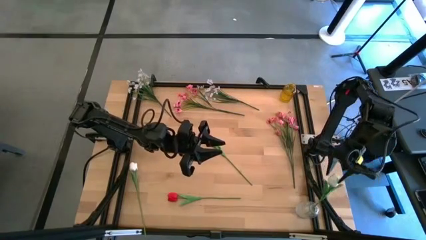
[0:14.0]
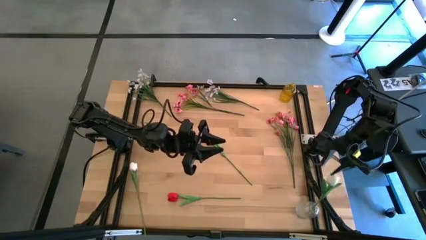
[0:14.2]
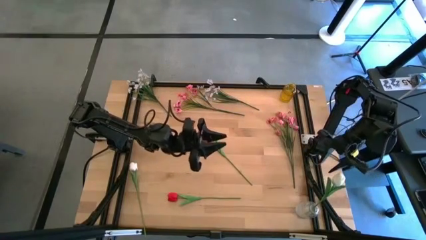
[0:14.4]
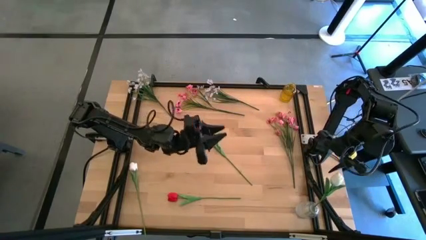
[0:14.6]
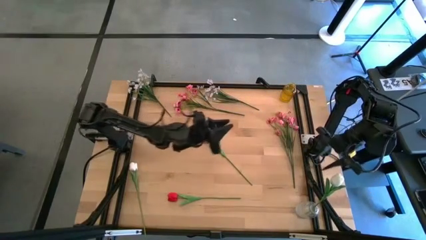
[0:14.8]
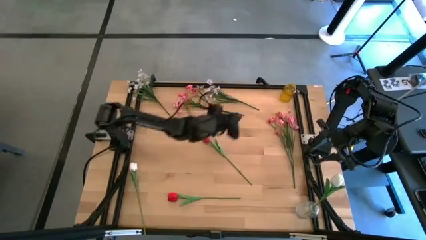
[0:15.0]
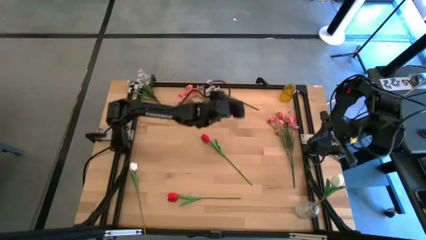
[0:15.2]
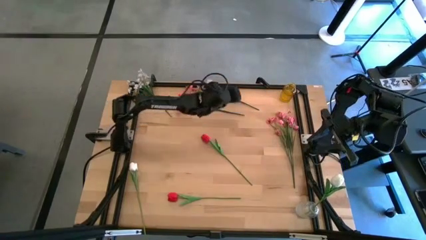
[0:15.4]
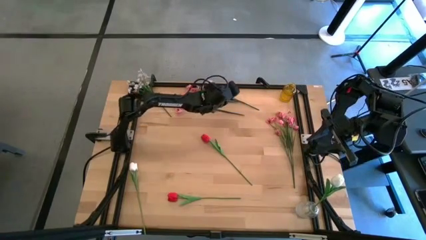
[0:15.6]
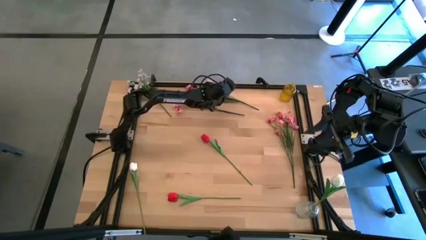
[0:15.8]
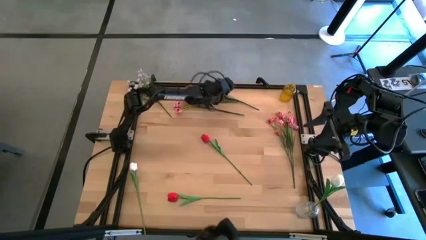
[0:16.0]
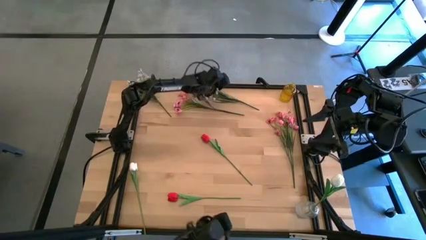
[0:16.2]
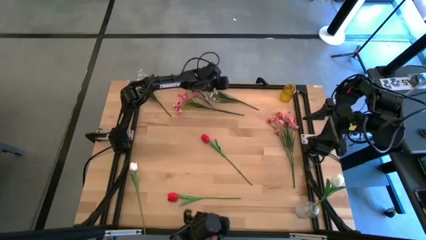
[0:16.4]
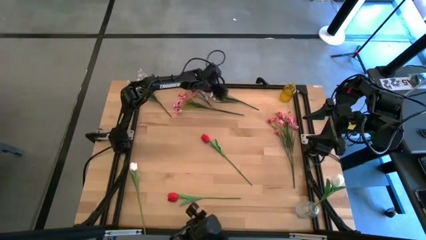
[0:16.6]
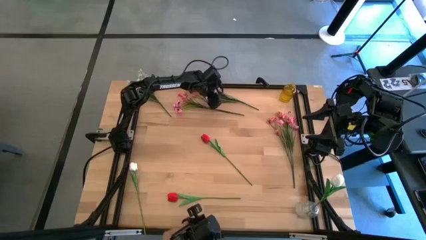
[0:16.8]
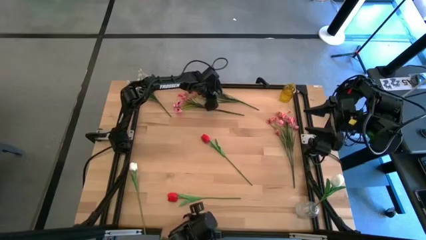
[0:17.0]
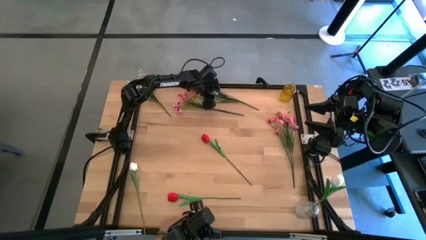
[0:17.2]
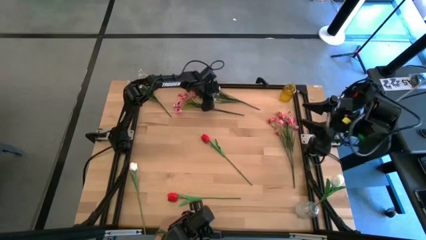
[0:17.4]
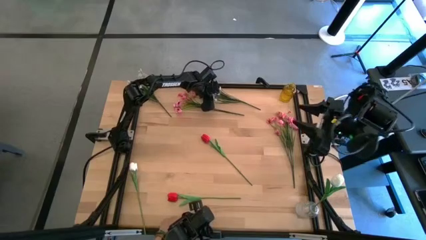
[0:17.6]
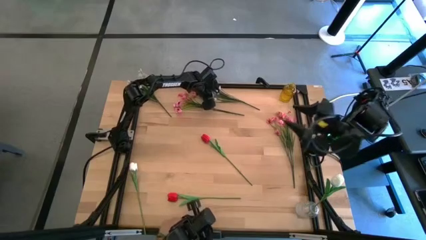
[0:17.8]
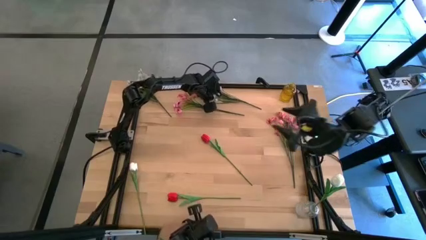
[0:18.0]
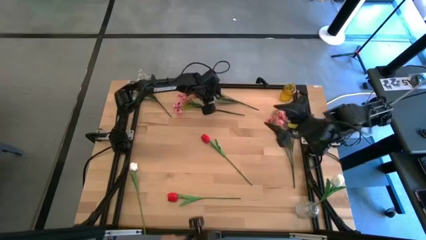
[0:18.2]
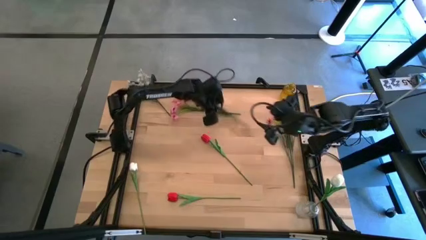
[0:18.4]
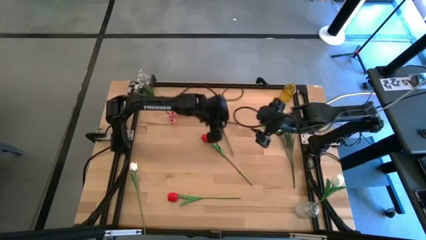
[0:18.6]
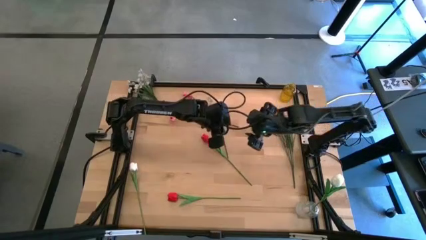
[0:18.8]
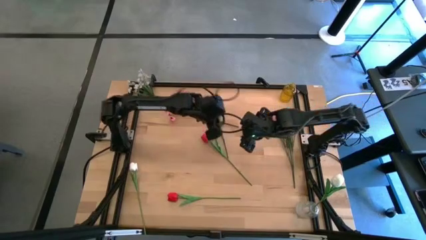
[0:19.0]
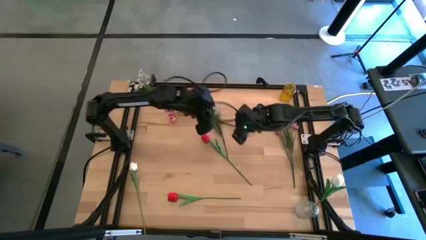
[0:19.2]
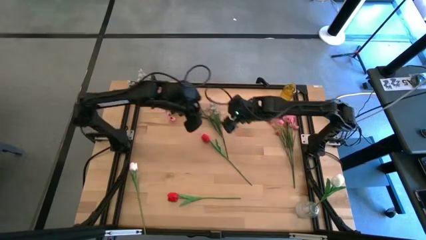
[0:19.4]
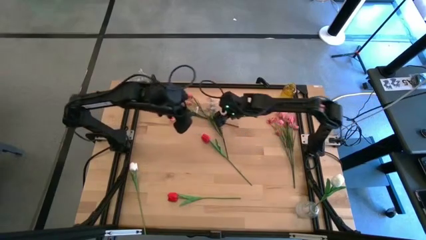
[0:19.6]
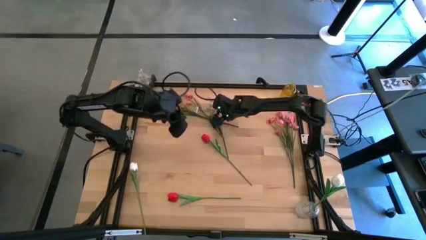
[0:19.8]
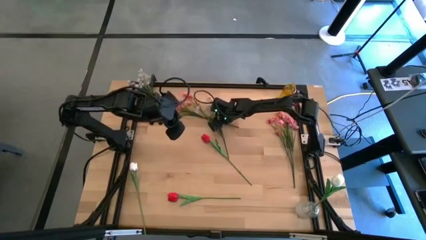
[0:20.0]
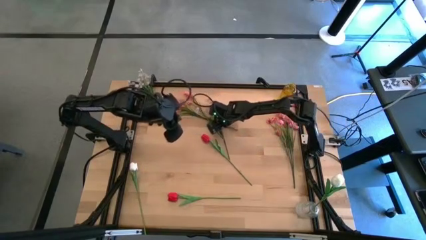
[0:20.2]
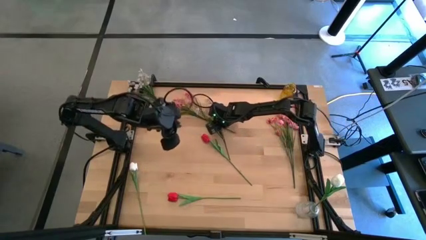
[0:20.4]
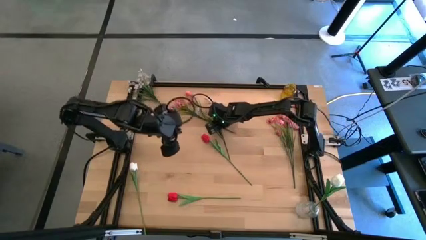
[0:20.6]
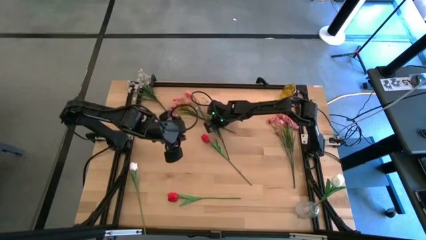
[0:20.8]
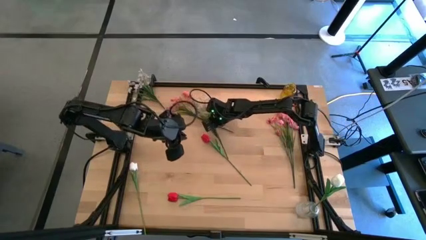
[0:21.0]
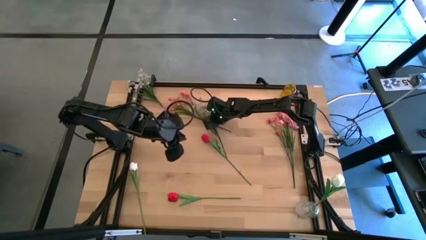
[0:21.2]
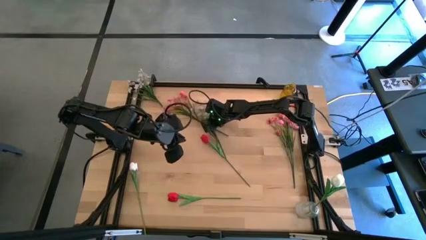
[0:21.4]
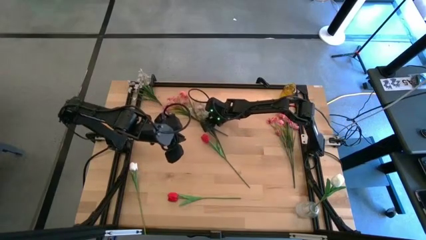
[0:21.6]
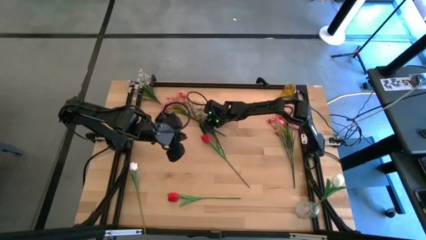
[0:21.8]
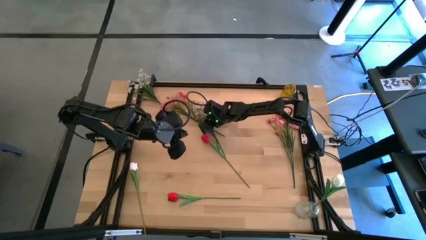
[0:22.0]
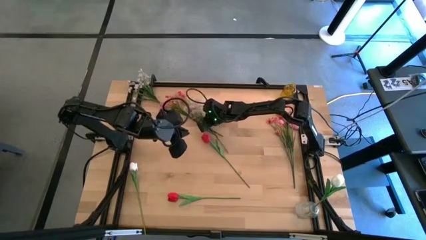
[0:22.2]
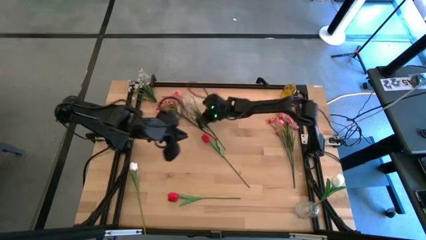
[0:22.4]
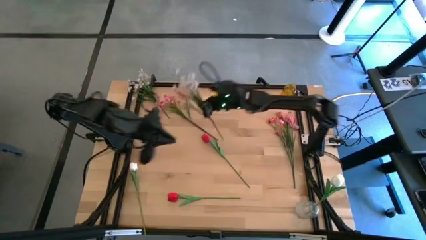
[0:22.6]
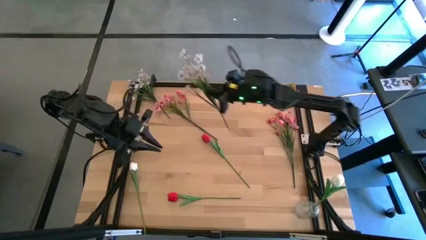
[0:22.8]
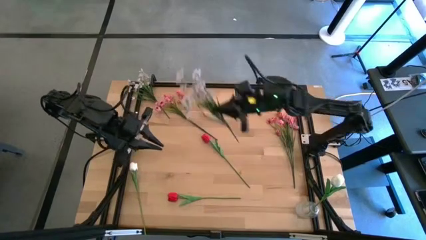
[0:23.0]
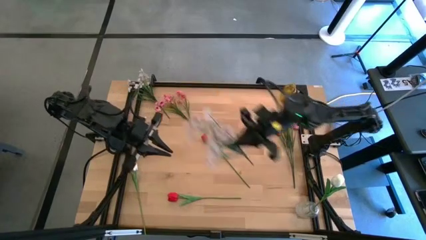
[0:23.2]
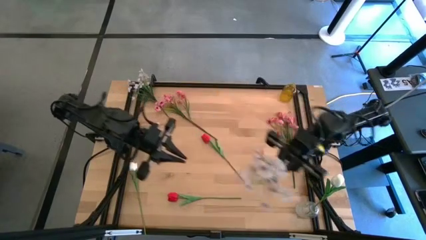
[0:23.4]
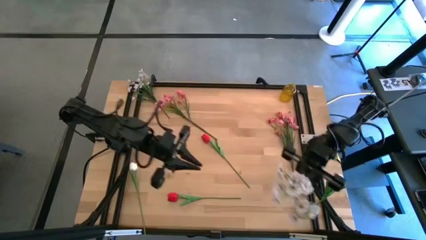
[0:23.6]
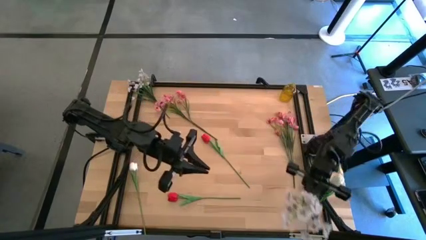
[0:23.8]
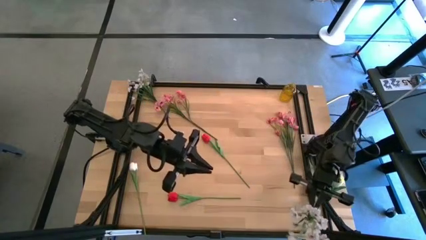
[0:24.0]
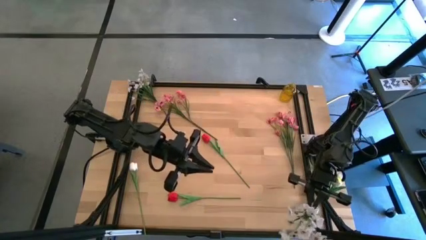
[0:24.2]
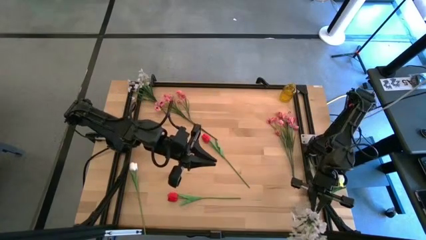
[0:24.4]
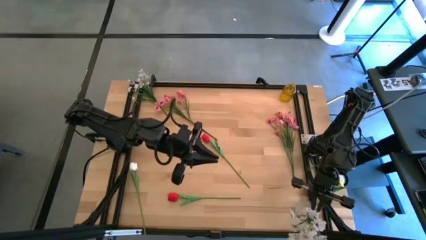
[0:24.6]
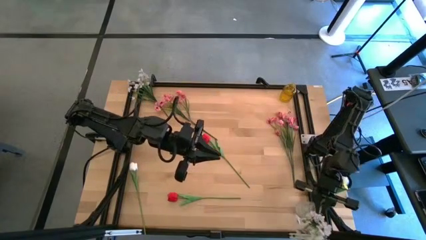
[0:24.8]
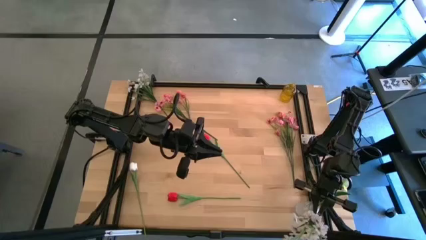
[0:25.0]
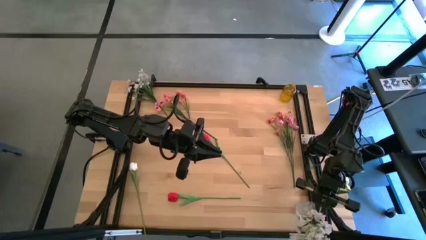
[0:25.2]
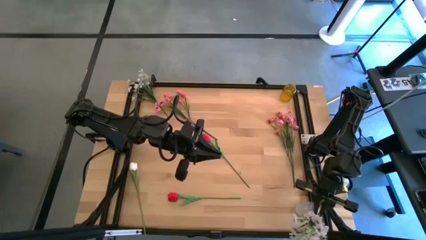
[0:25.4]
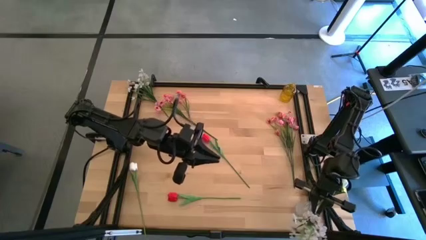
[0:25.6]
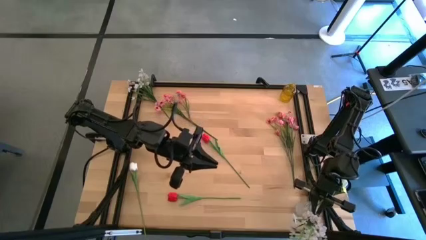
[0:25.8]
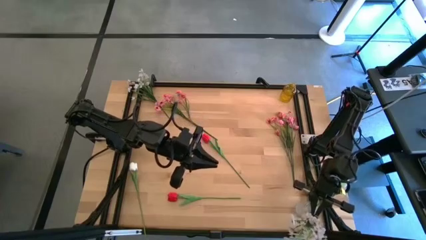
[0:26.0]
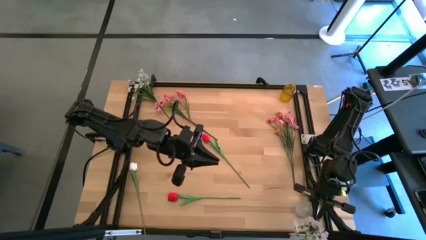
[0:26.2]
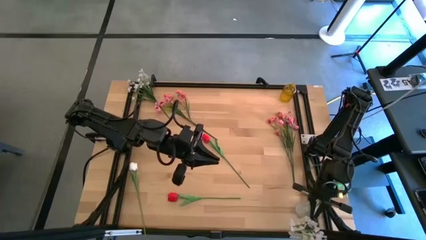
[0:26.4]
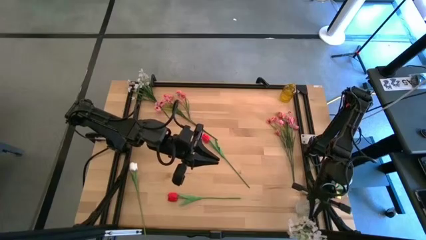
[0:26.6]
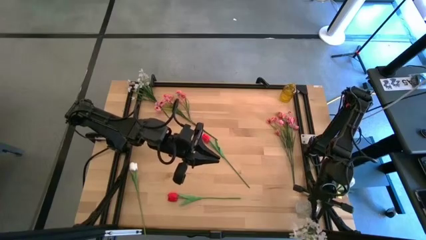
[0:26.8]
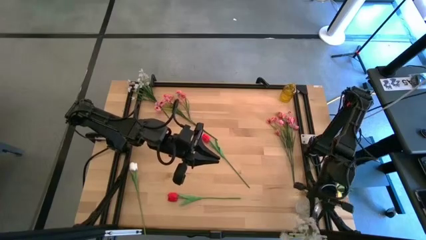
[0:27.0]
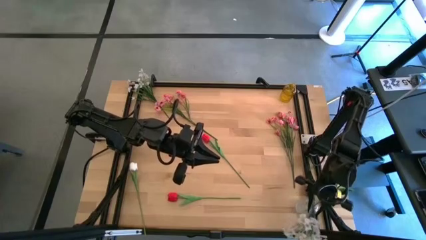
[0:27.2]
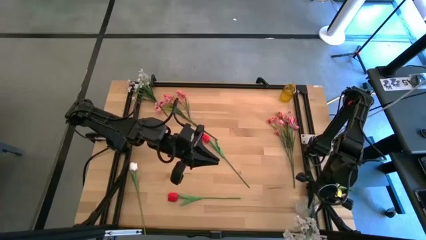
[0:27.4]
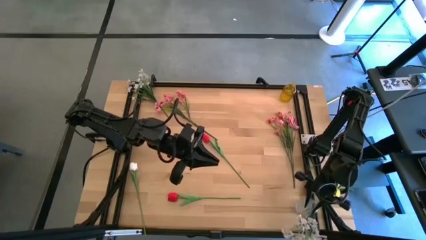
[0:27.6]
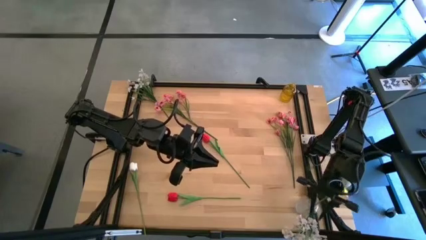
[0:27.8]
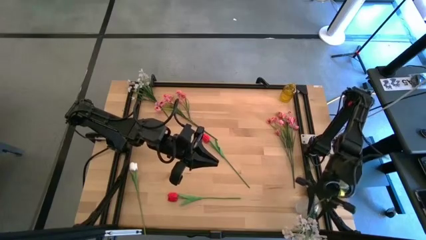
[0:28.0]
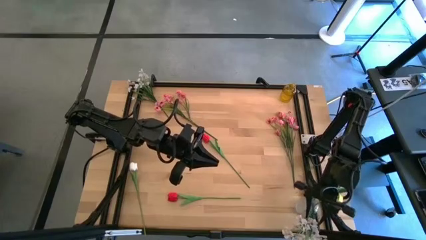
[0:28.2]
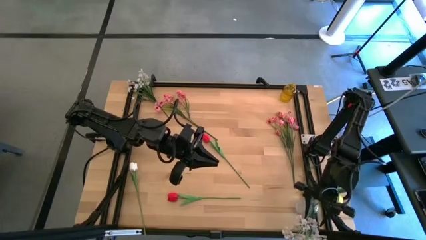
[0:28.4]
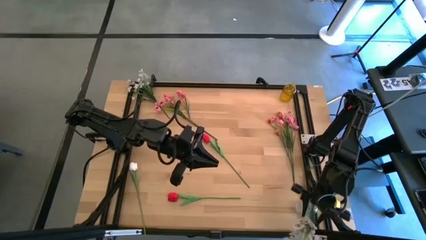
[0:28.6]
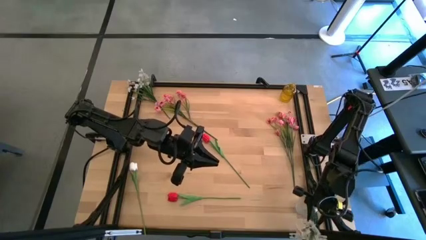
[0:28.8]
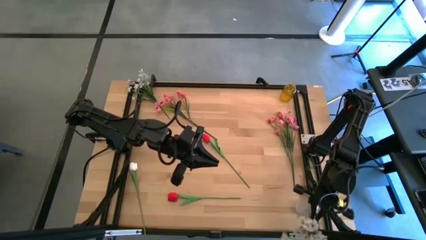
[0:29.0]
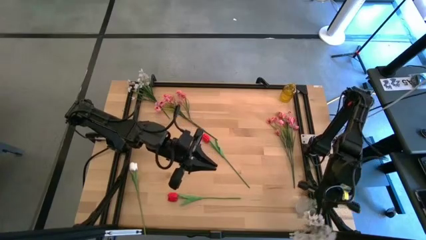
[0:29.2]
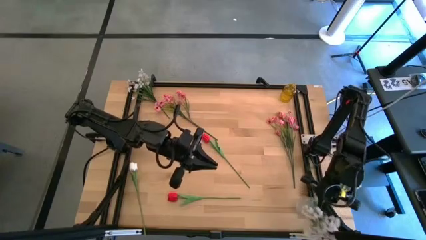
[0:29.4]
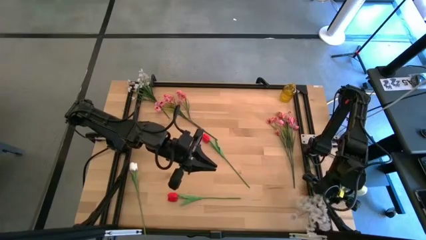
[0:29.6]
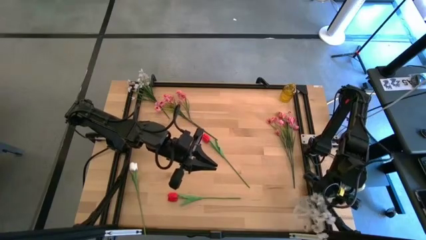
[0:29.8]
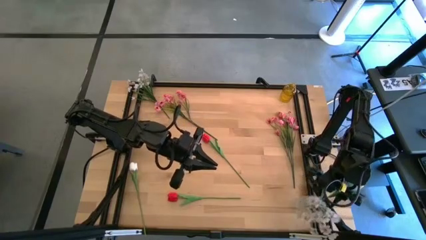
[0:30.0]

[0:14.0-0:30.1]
Task: Sort flowers into vase by color
Put the right white flowers into the transparent vase
